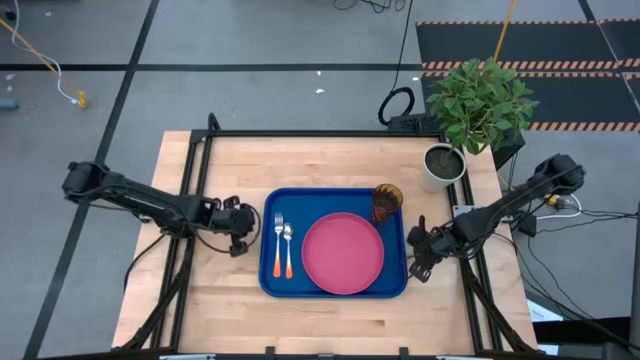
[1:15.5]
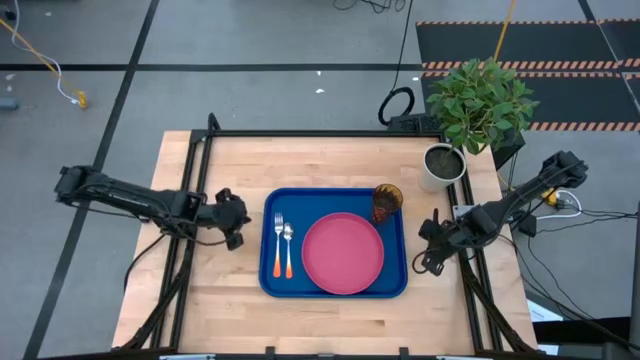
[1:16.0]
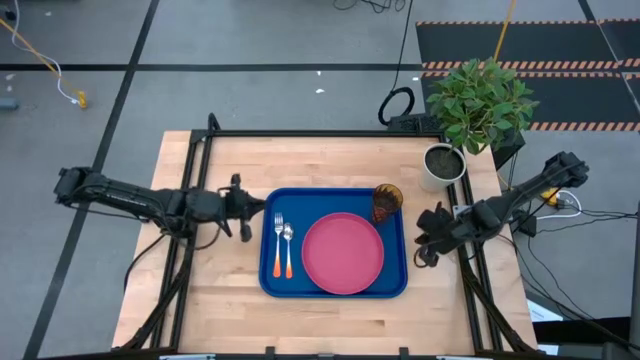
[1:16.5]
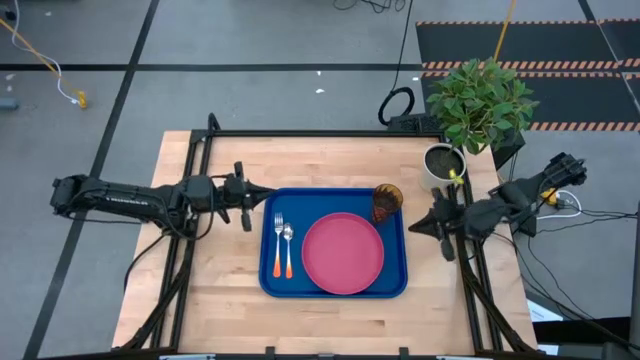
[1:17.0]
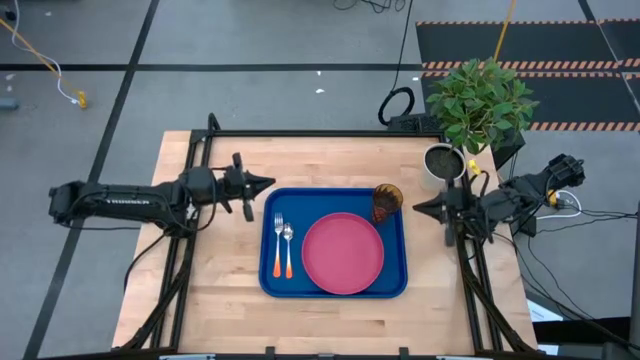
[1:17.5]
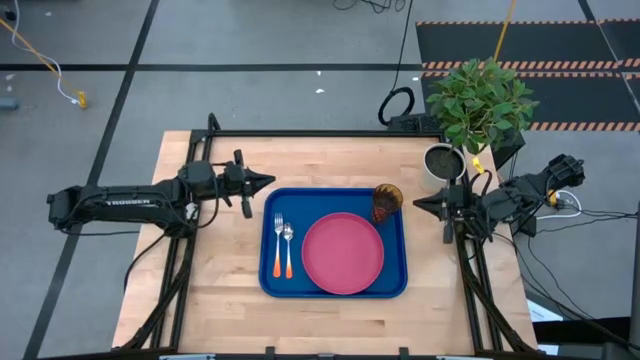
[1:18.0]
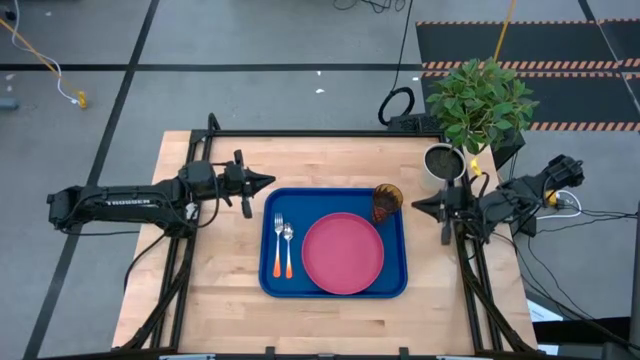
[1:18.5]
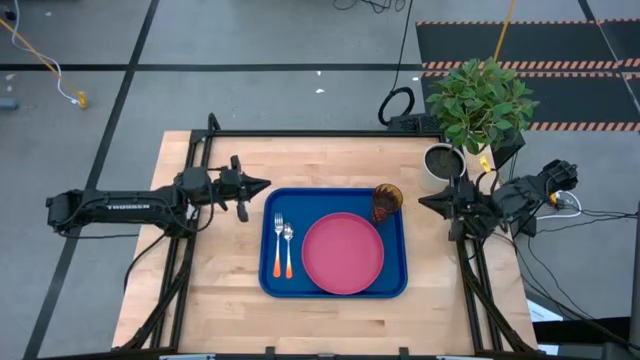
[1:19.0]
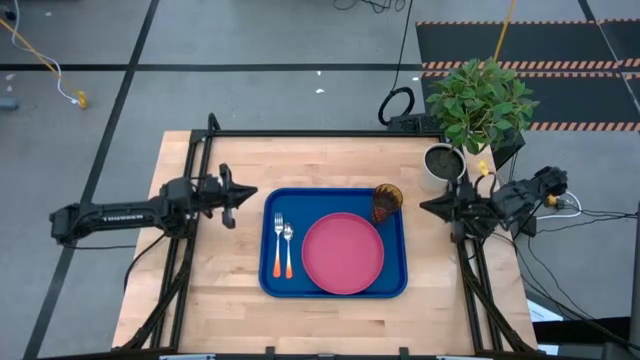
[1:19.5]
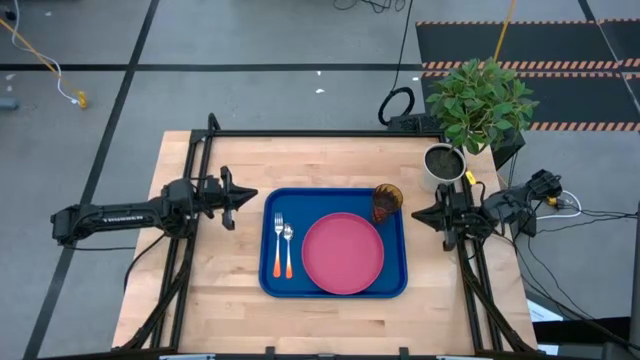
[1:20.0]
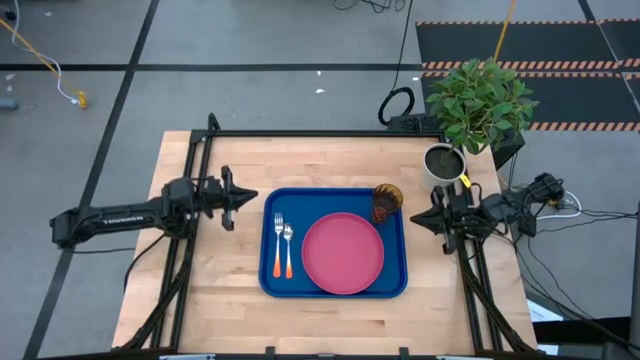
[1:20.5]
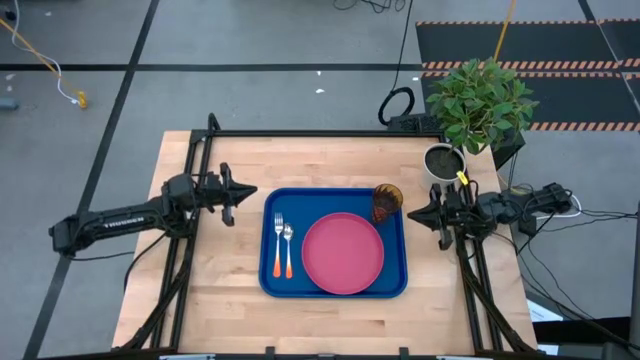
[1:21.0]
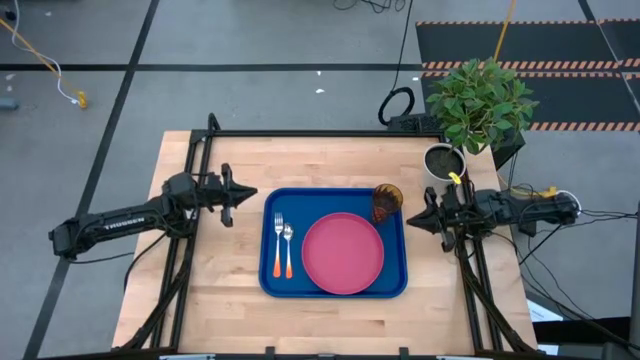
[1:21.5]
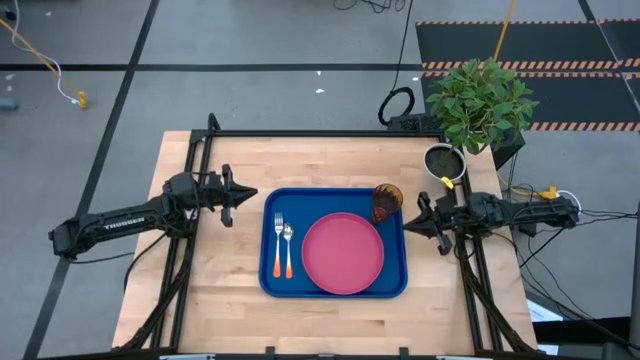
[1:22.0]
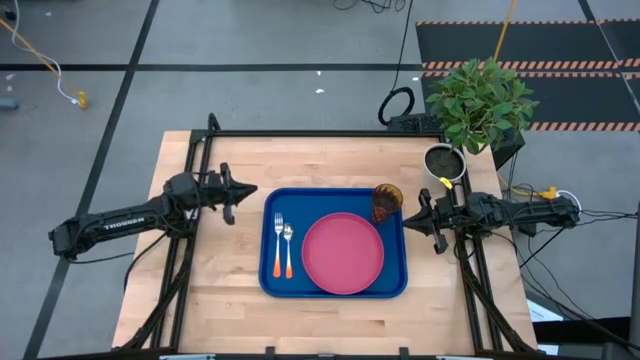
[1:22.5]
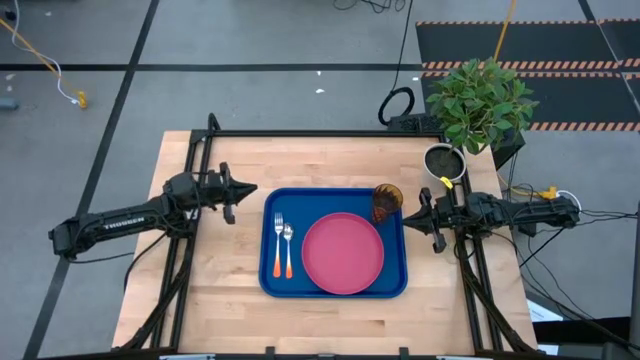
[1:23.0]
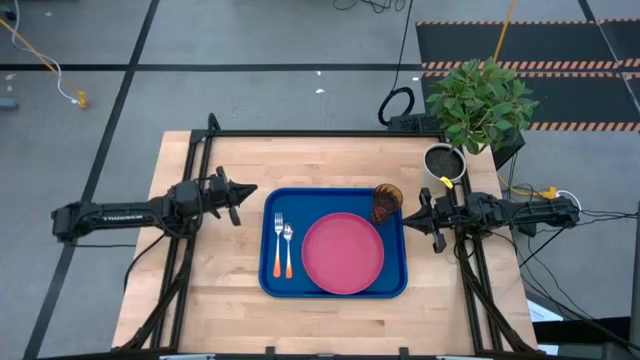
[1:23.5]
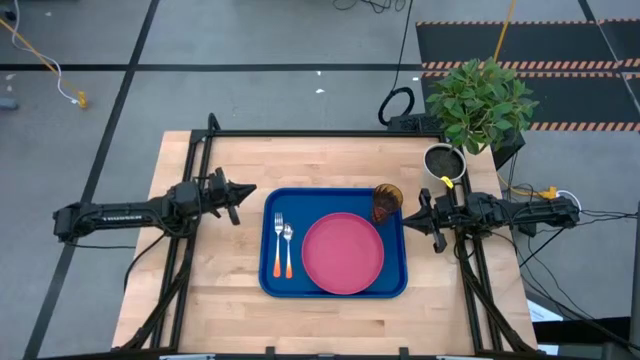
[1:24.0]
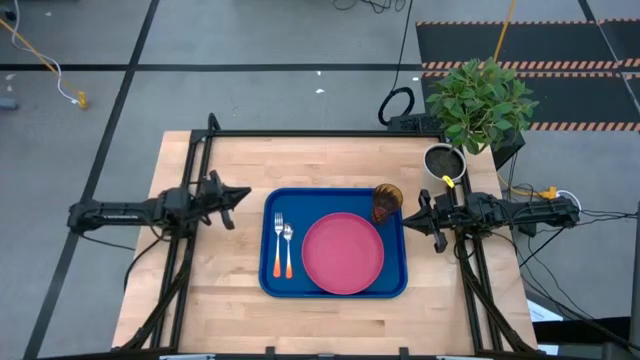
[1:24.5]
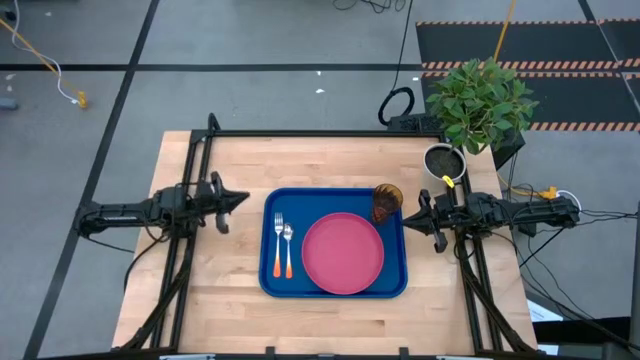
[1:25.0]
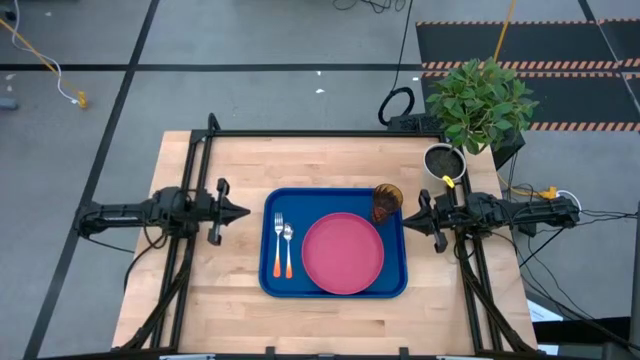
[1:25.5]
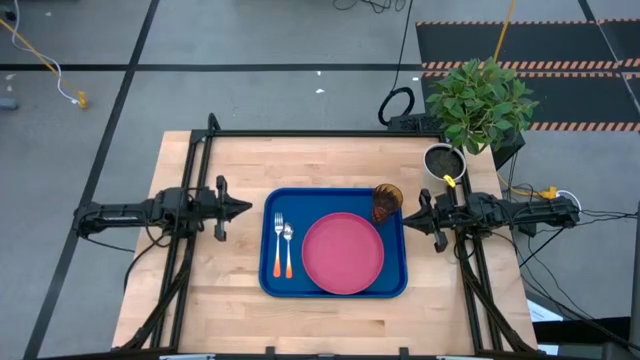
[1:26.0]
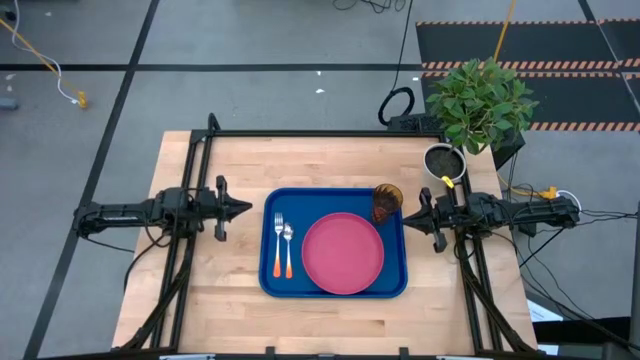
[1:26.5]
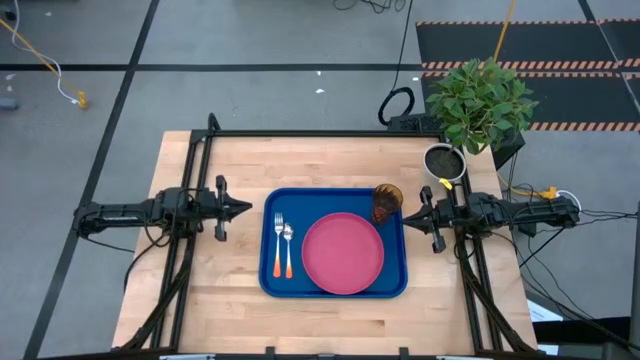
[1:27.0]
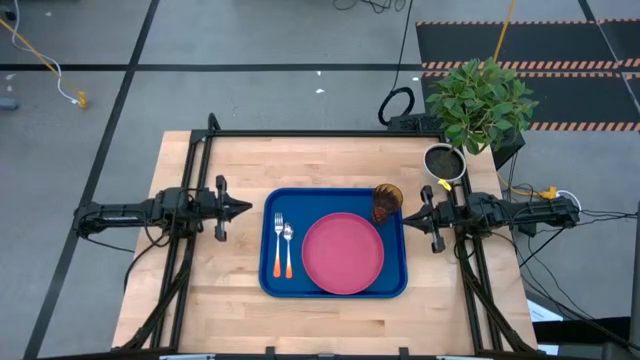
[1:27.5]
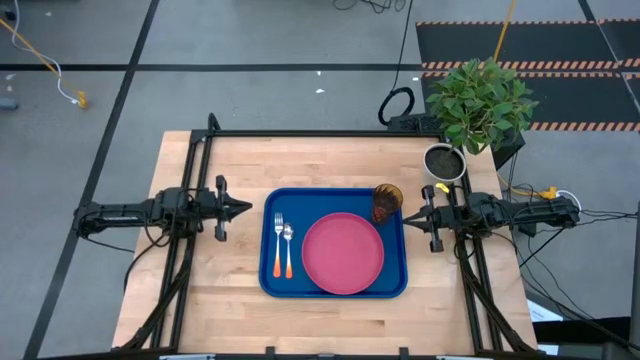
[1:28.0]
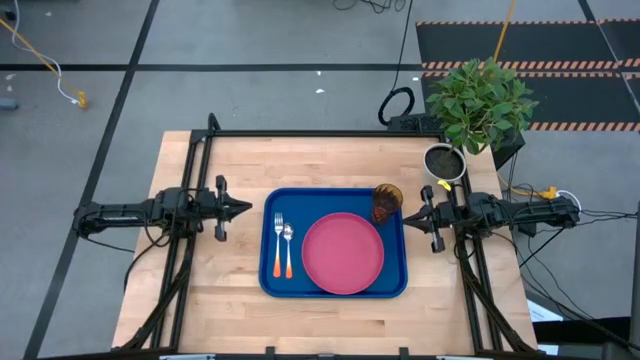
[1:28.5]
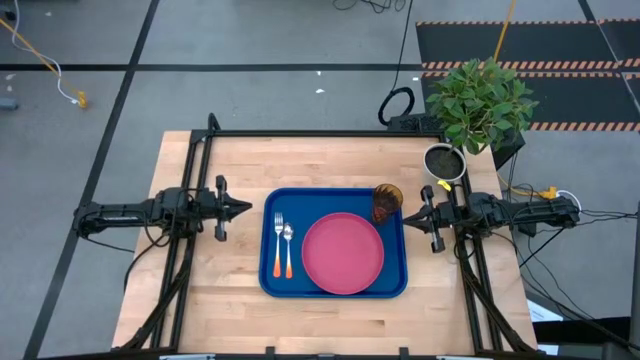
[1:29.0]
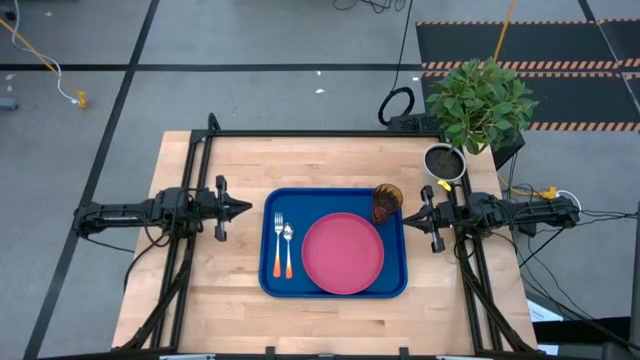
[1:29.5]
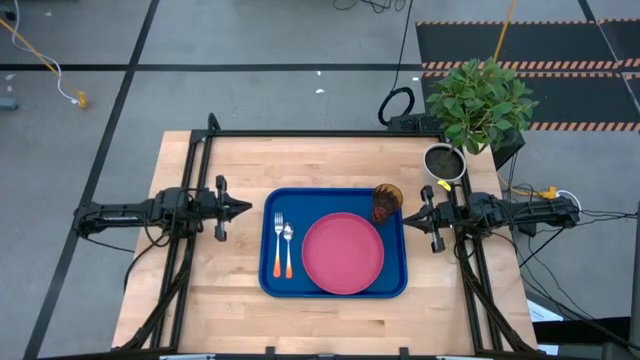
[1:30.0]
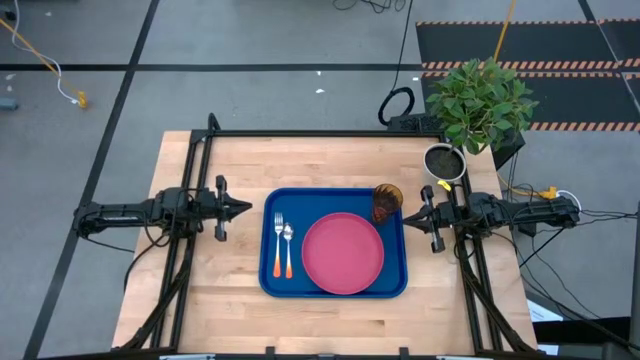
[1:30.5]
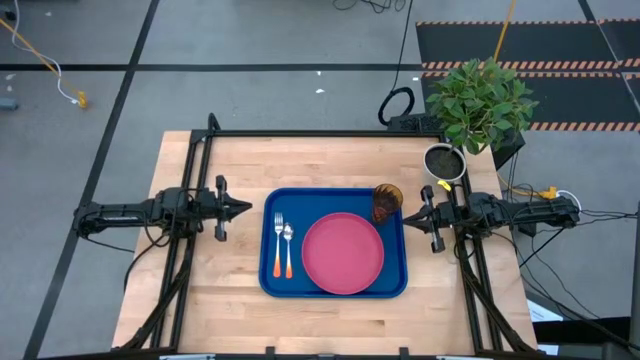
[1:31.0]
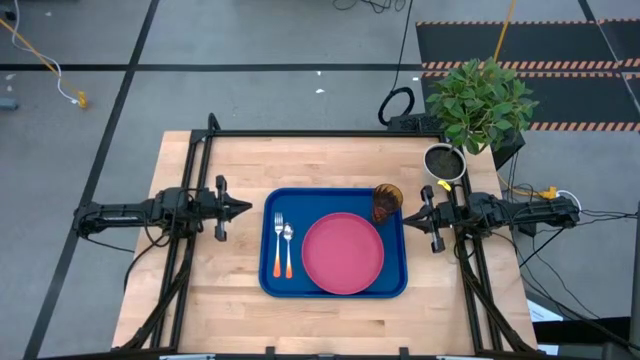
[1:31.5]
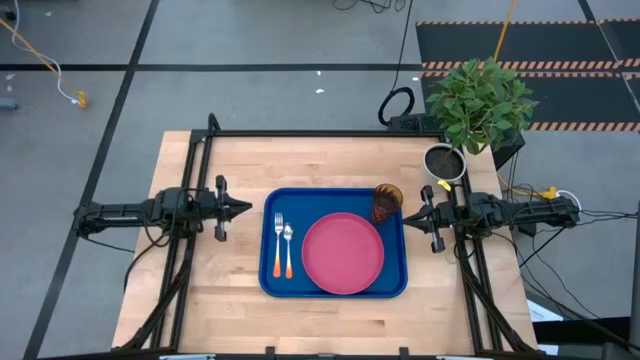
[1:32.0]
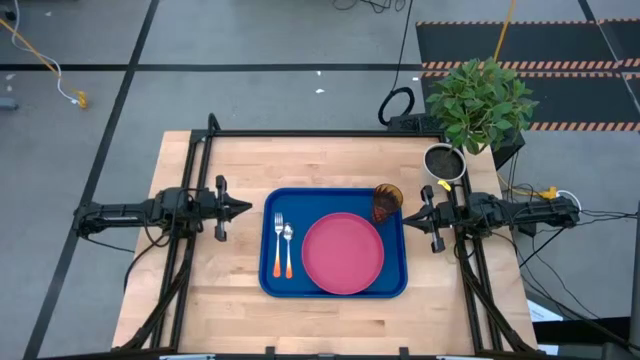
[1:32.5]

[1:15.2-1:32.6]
Task: Pick and place plate/cup/fork/spoon on tray
Return to Home Position

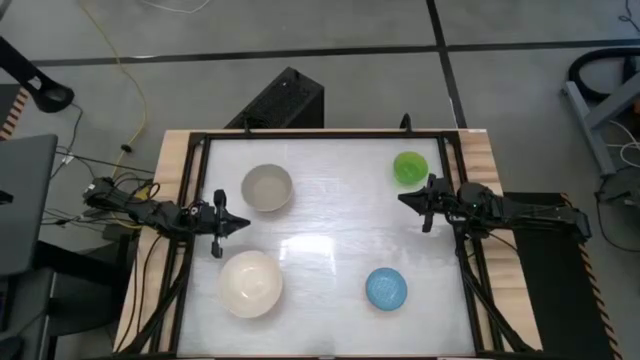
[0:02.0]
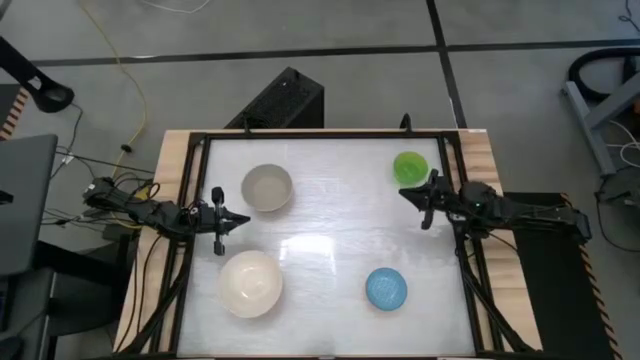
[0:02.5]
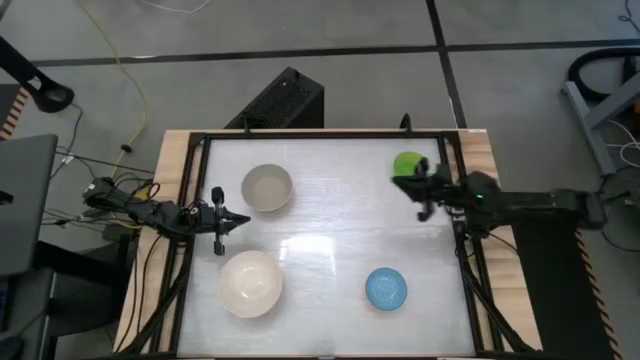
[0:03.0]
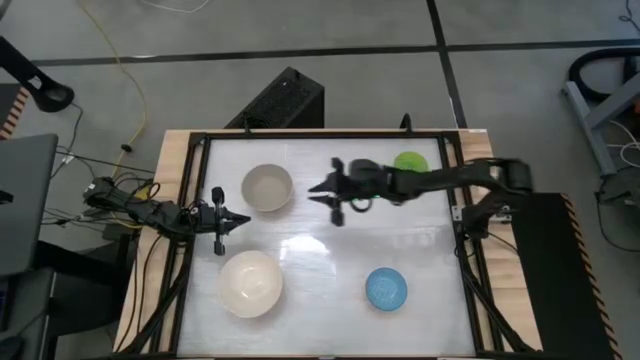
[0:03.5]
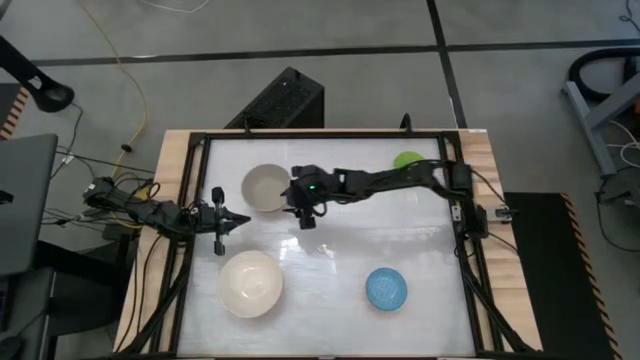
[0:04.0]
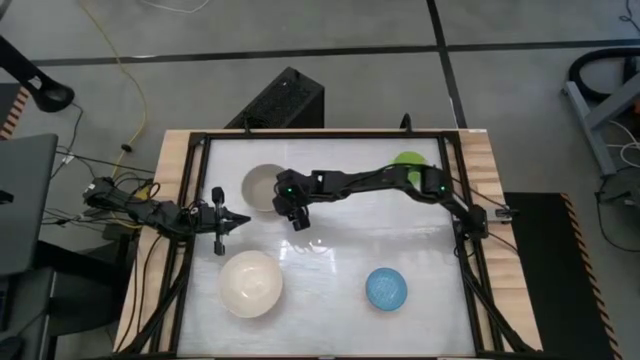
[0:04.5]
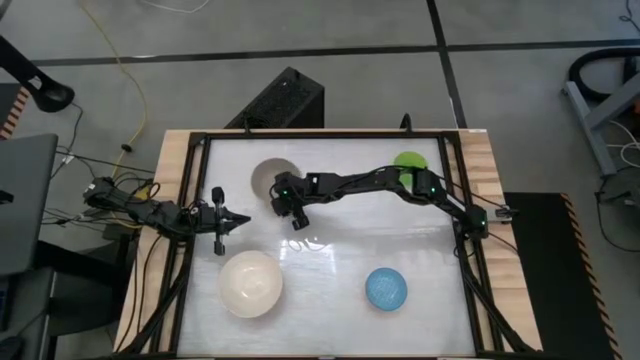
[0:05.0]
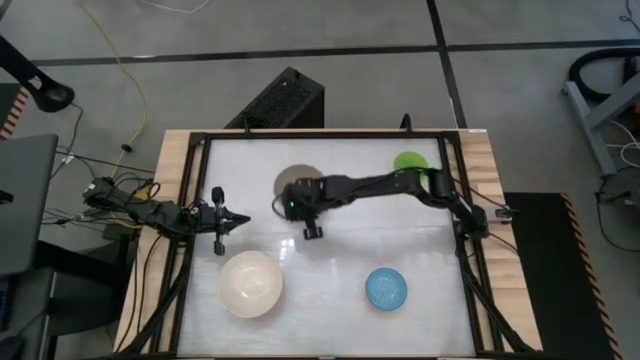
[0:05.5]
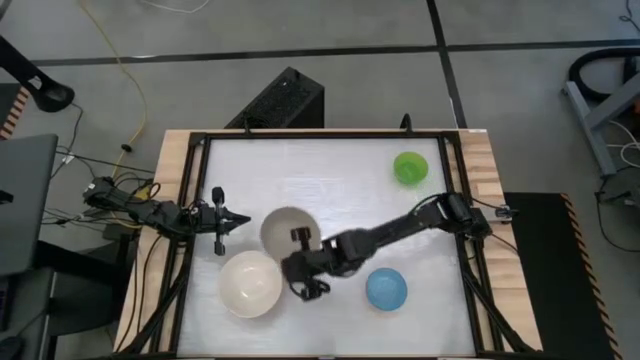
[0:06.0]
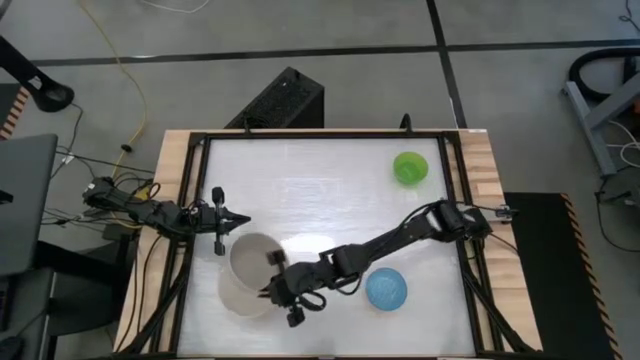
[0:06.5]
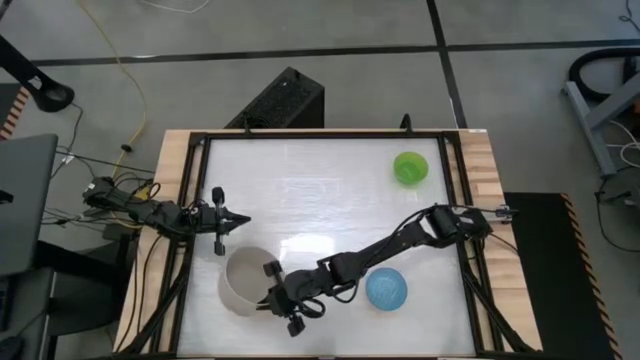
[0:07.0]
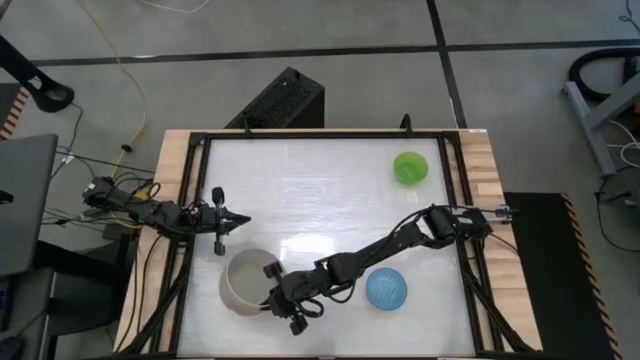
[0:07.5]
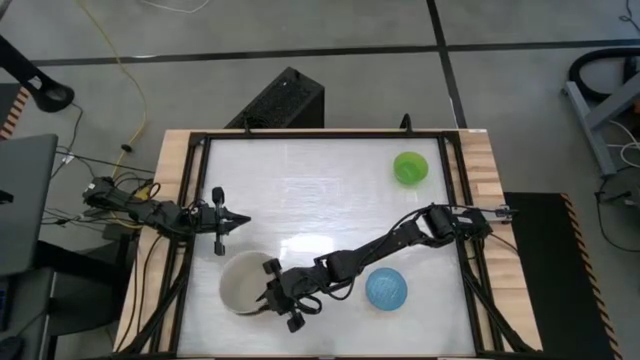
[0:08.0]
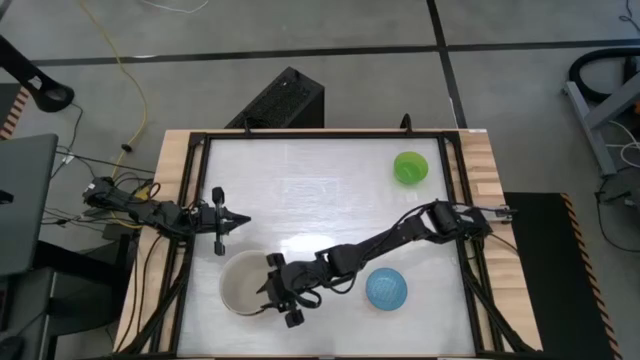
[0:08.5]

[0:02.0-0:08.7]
Task: Nest bowls inside each other by size order
Stack the gray bowl on top of the white bowl
